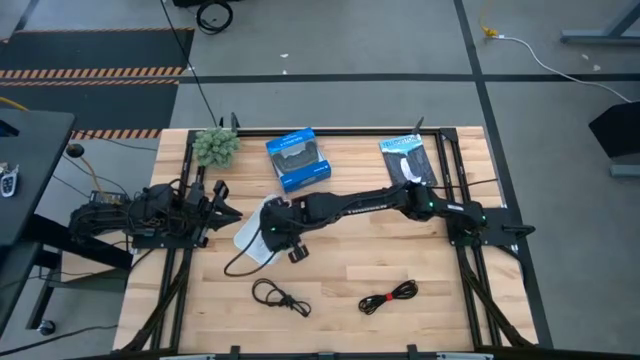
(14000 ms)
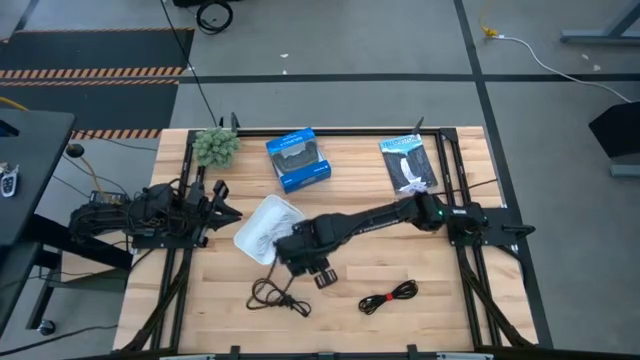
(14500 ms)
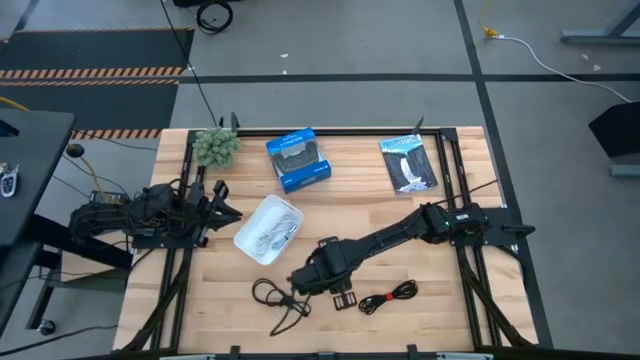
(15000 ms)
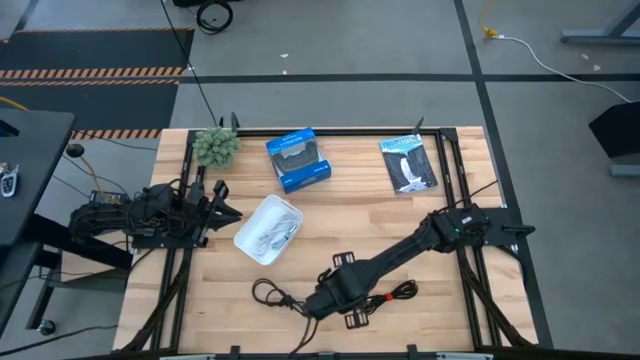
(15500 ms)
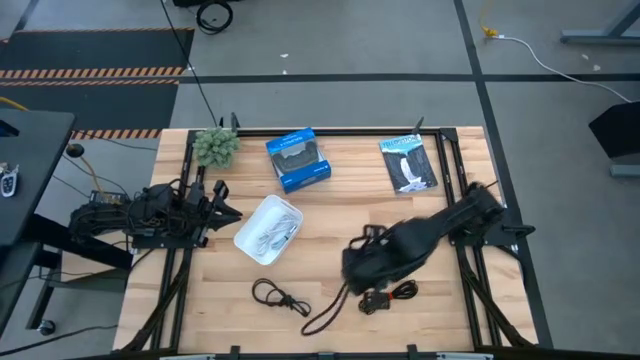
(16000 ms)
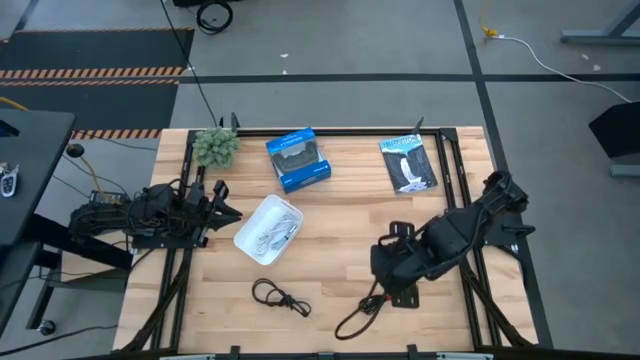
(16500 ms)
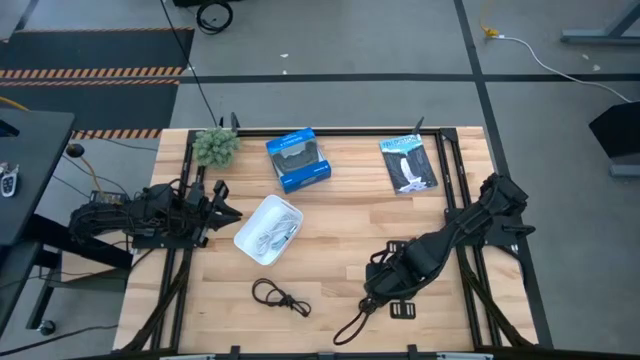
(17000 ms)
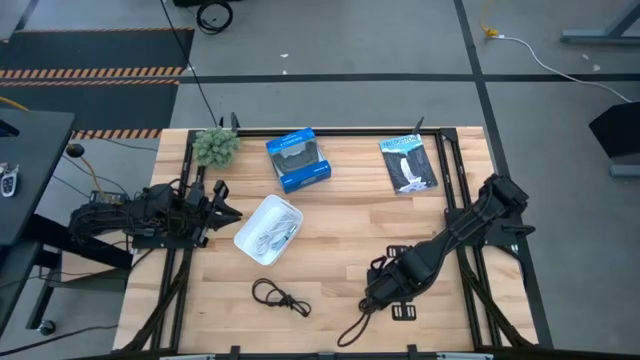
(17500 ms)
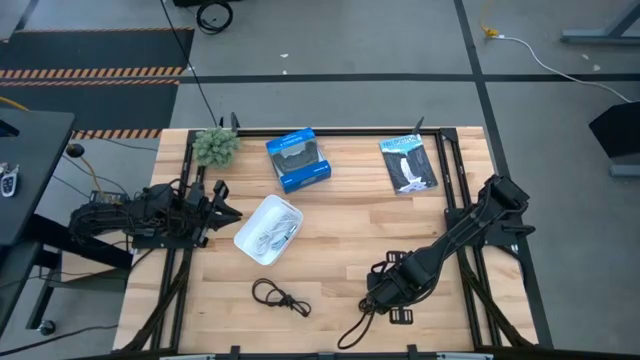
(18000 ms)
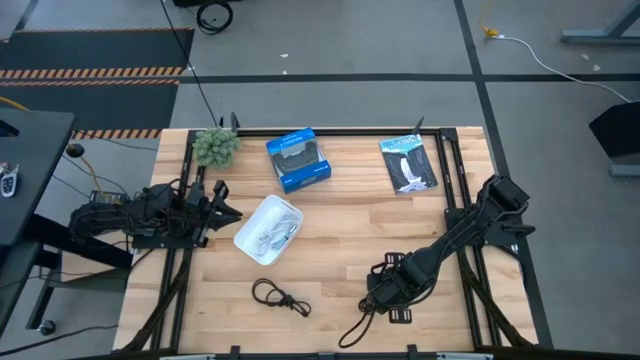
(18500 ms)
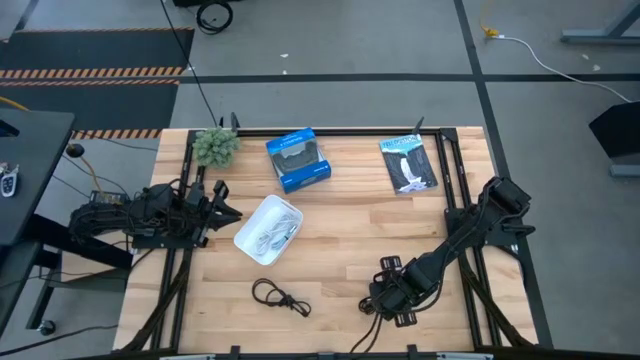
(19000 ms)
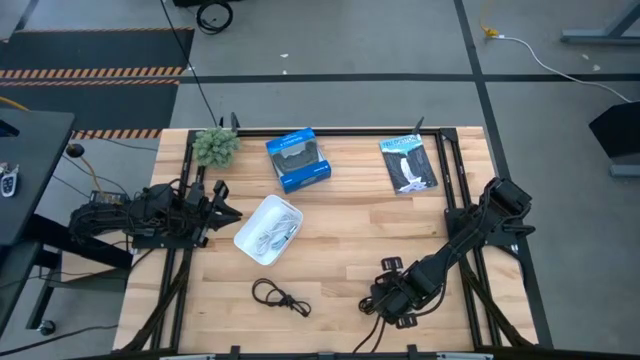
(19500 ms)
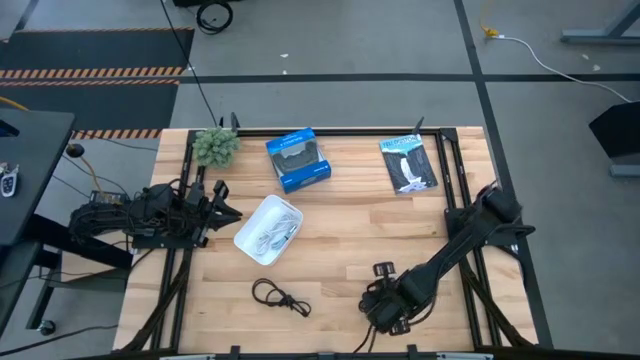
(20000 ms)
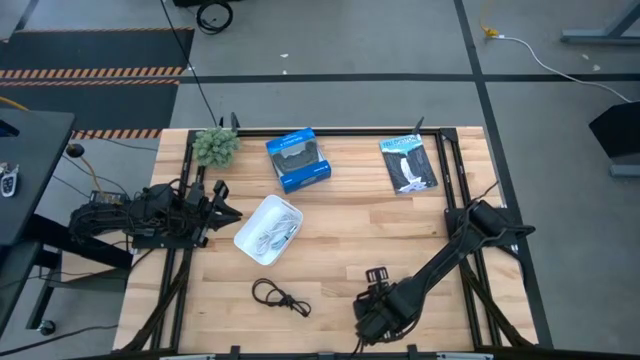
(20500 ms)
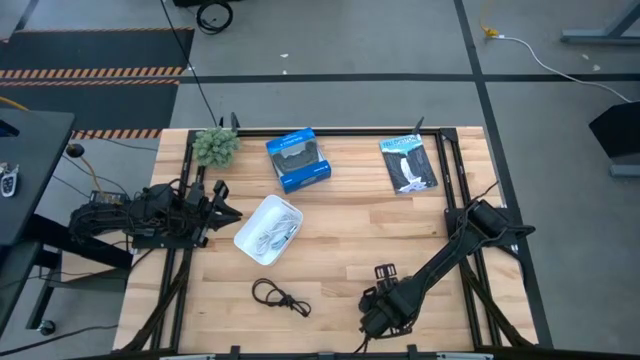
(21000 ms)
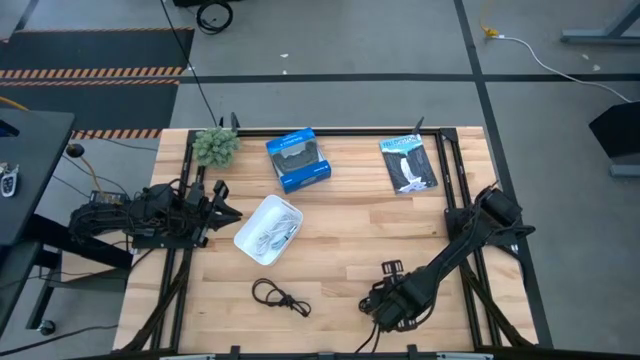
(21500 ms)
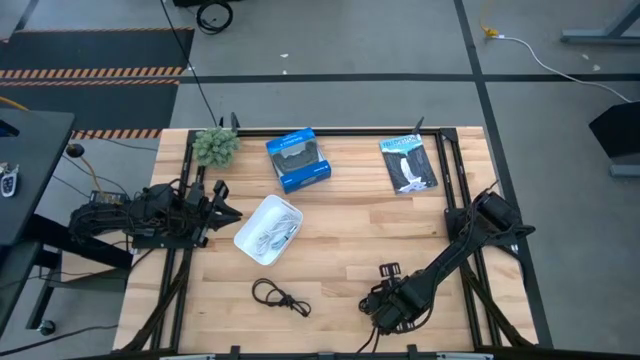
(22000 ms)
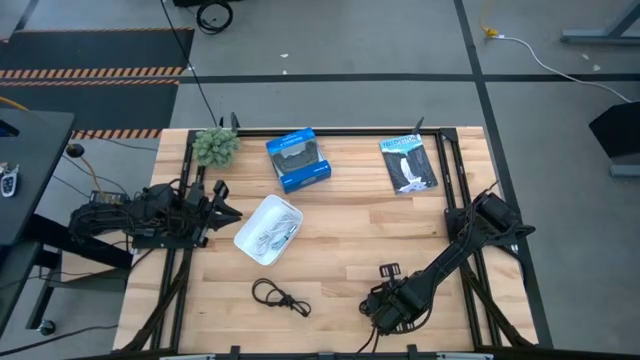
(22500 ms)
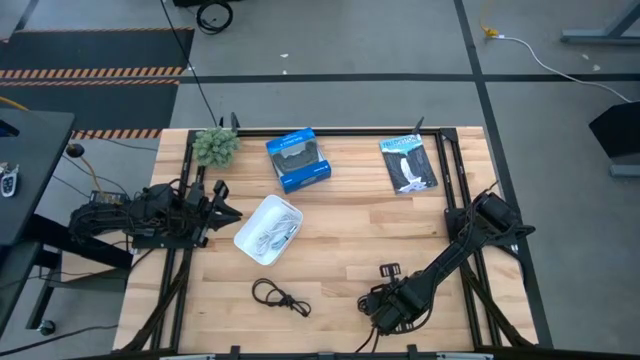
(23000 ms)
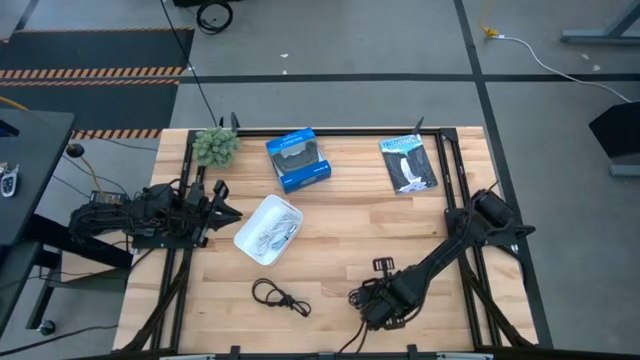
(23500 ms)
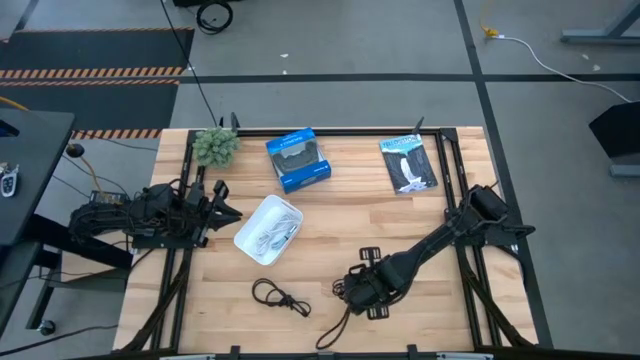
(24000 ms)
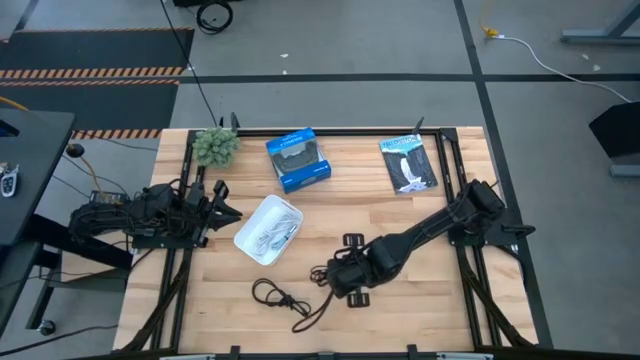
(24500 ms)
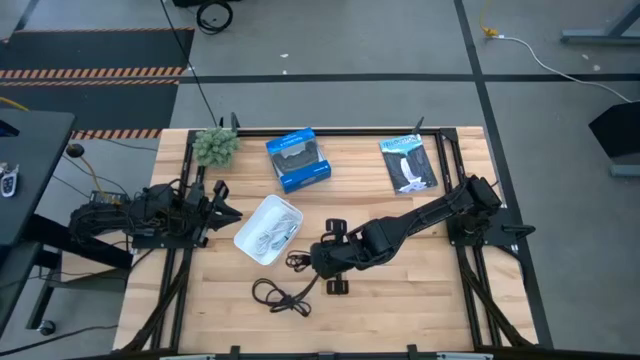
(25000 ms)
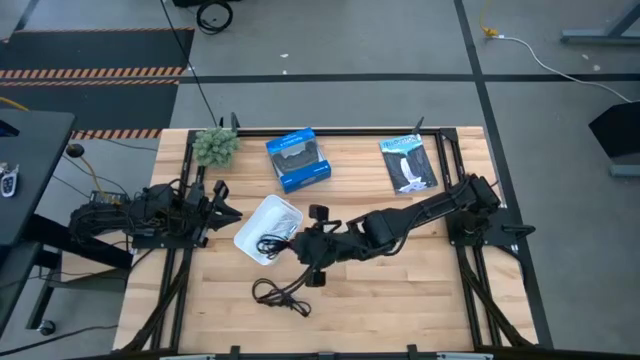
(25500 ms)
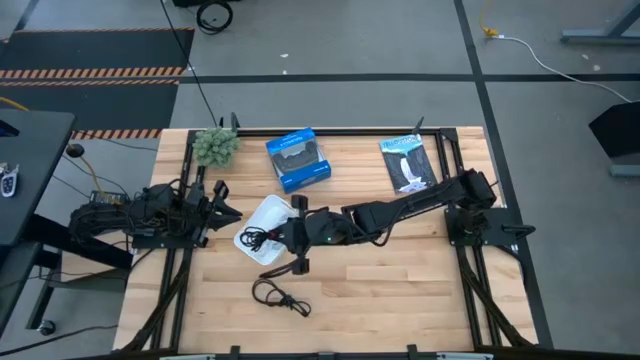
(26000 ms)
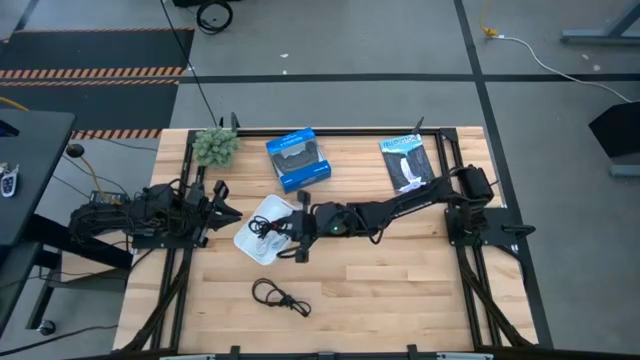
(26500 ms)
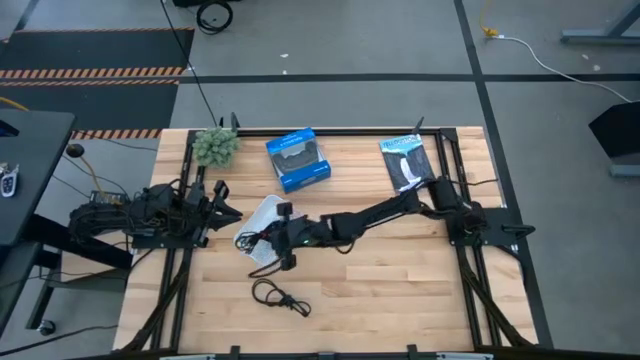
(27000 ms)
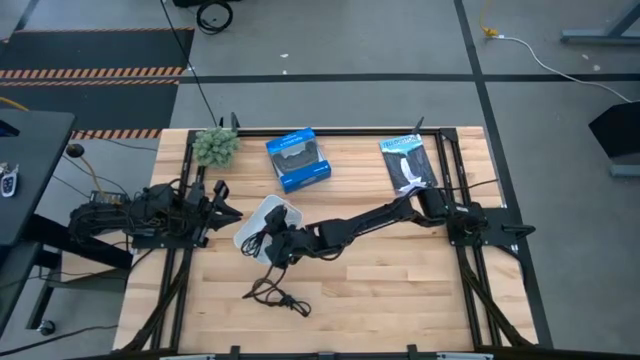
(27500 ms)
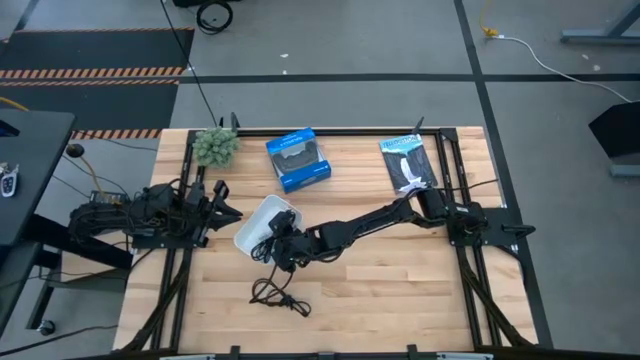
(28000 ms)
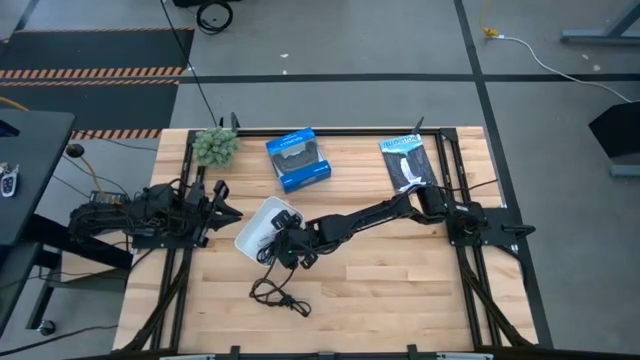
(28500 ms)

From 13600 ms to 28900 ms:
Task: Pick and place USB-C Cables
Put the right black charger cable into the white bin

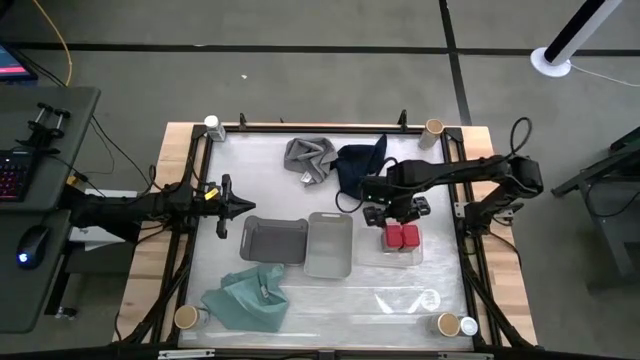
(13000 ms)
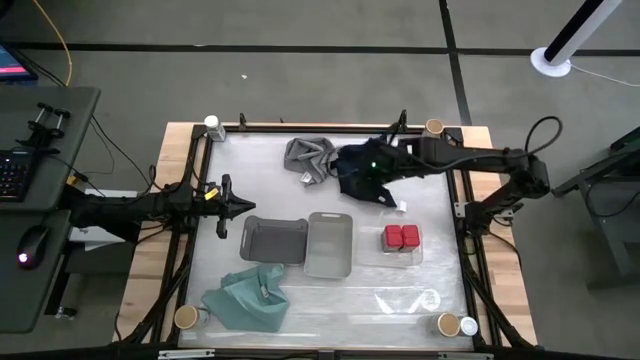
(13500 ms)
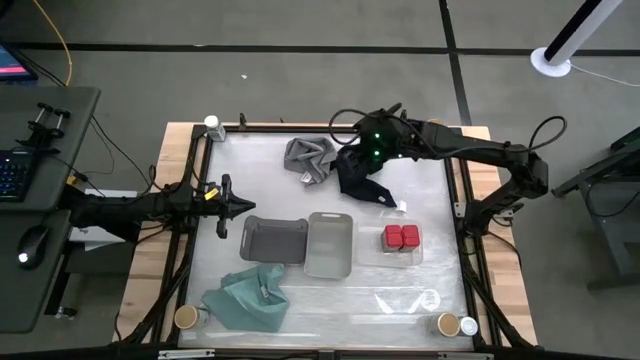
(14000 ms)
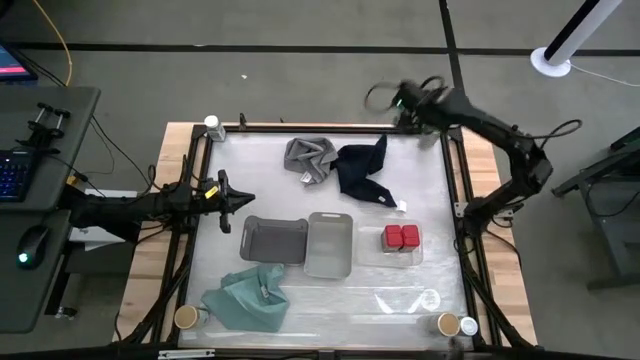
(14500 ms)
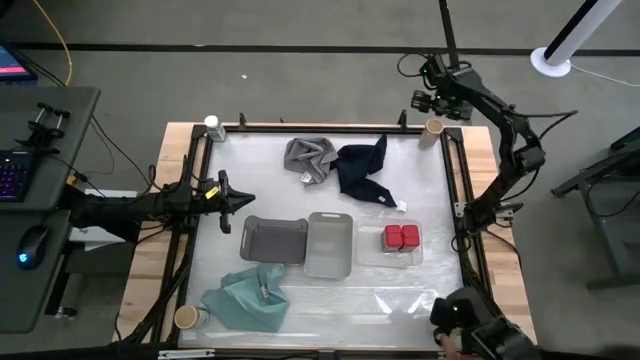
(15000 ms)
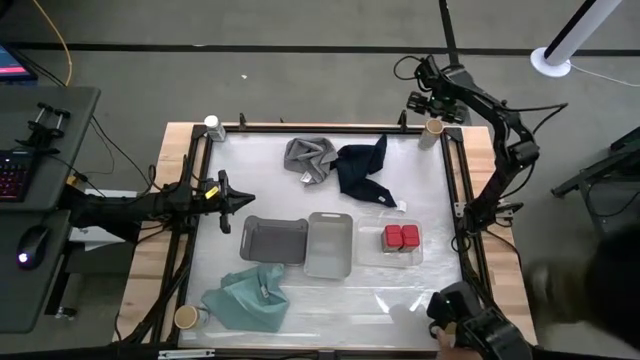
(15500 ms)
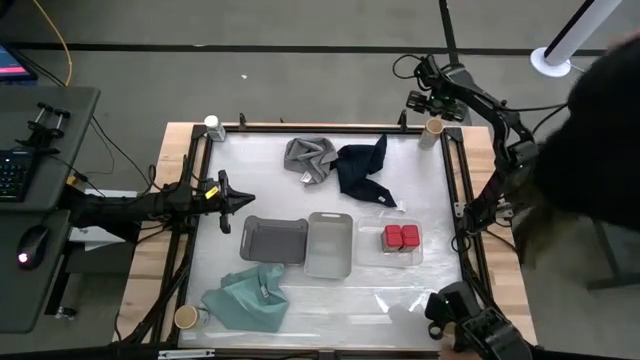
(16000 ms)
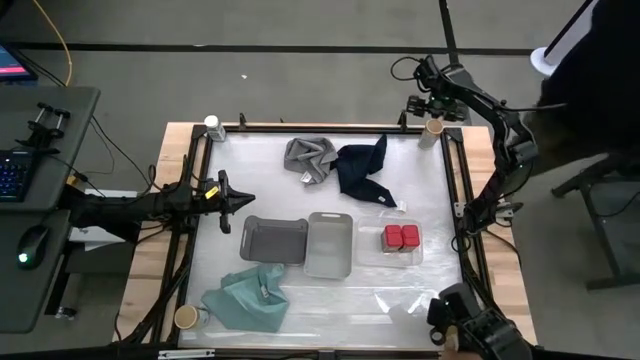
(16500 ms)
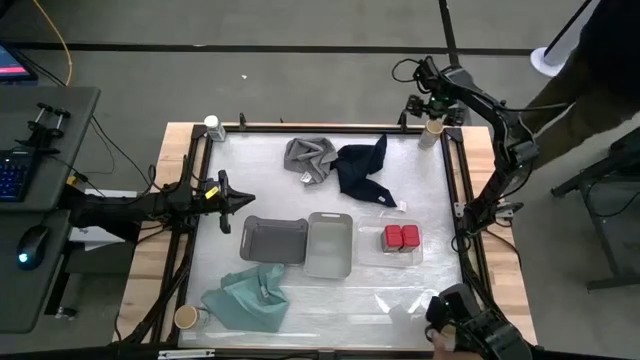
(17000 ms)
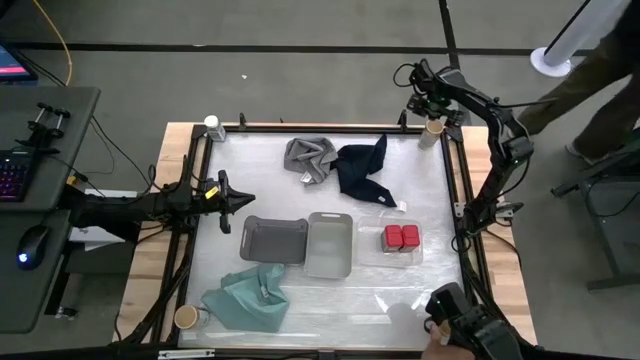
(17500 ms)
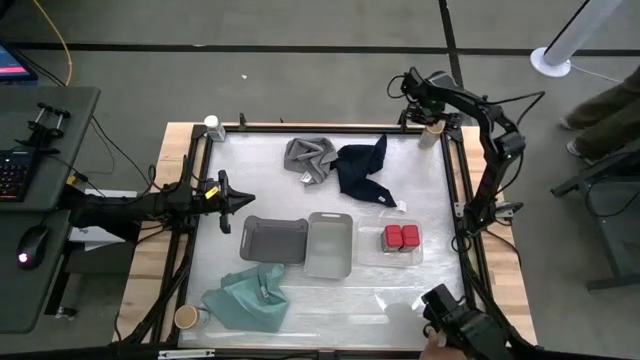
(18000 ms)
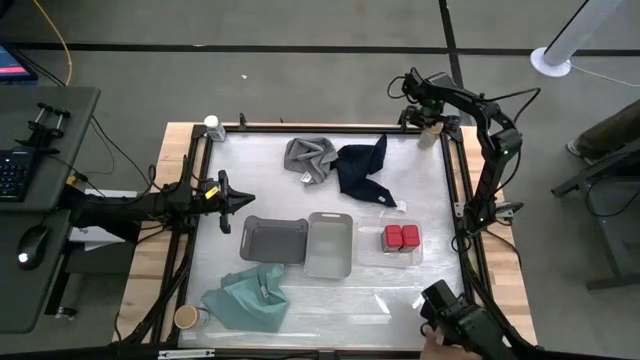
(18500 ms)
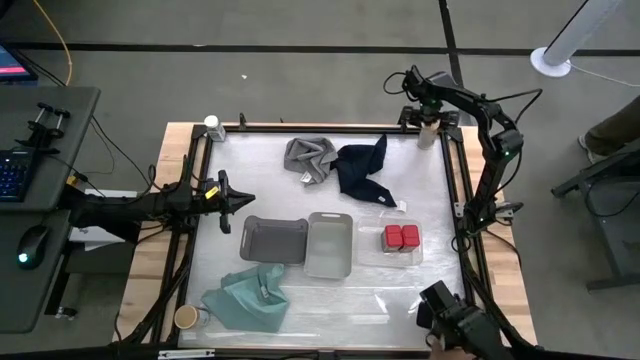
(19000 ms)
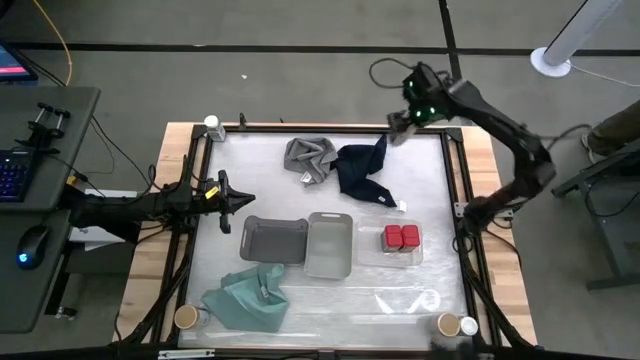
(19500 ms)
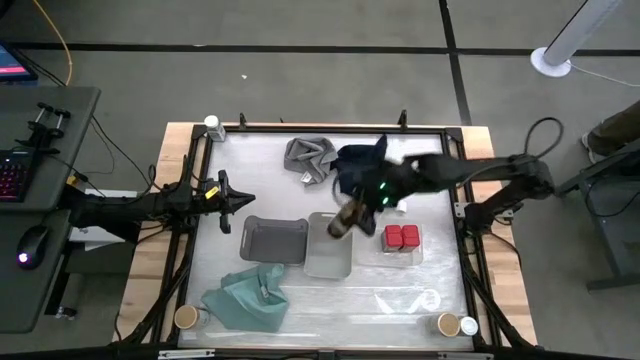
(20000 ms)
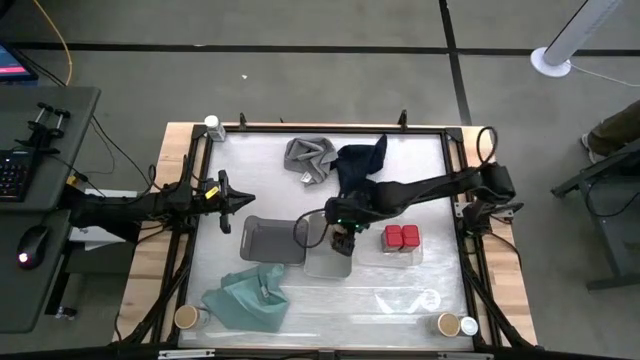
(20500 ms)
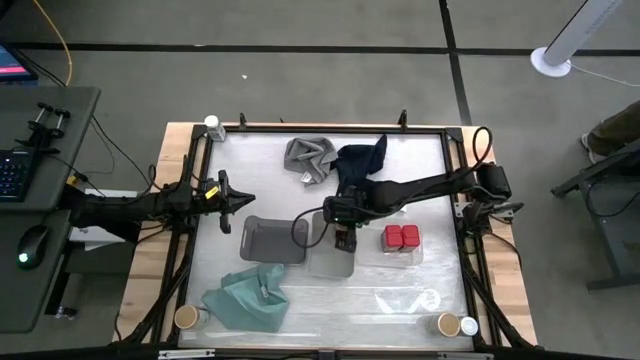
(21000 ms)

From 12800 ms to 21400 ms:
Task: Sort spices by type
Put the top brown spice bottle into the gray bin
